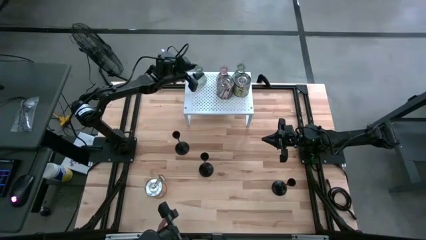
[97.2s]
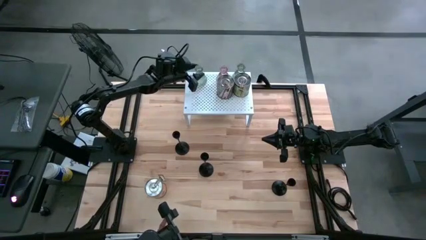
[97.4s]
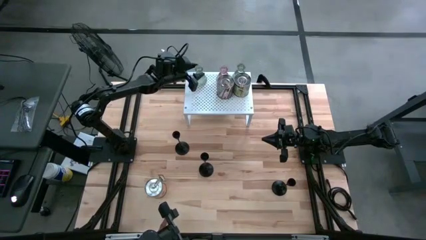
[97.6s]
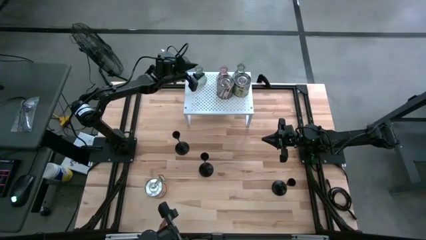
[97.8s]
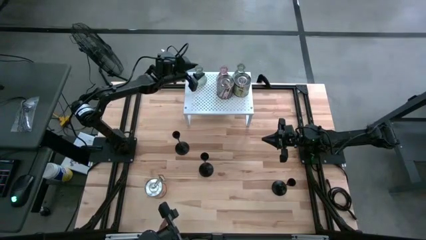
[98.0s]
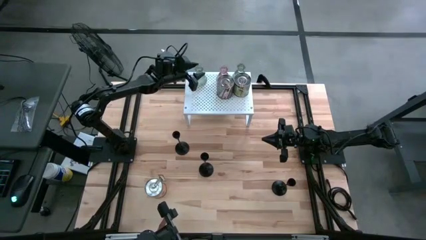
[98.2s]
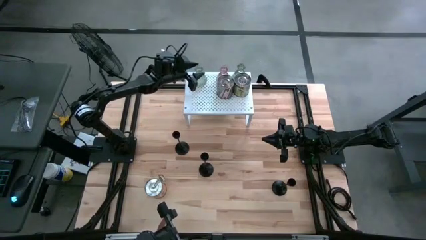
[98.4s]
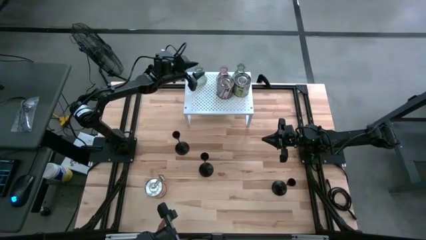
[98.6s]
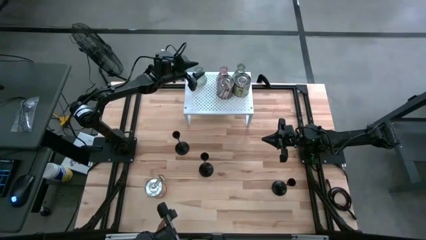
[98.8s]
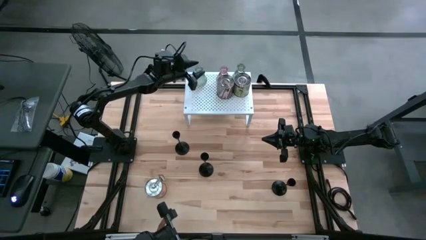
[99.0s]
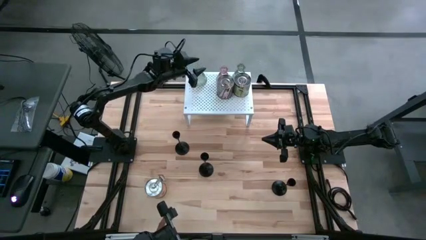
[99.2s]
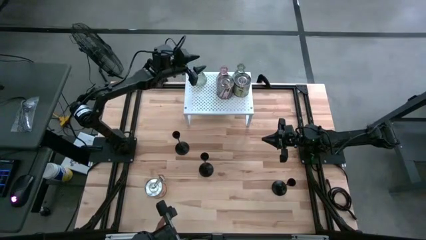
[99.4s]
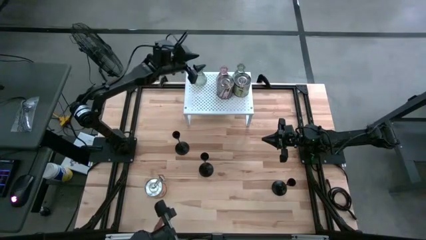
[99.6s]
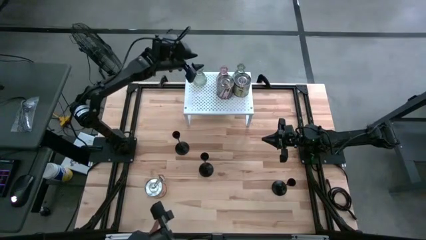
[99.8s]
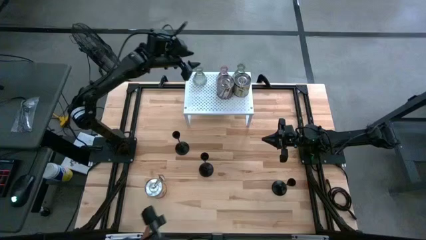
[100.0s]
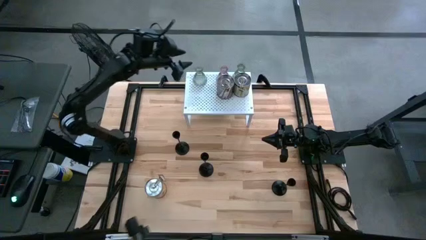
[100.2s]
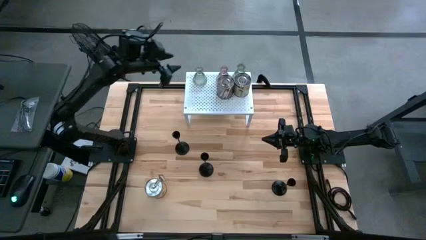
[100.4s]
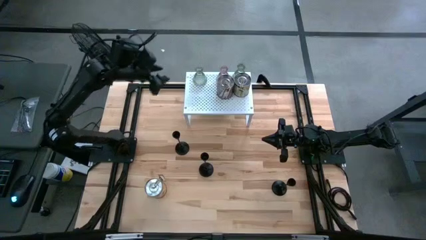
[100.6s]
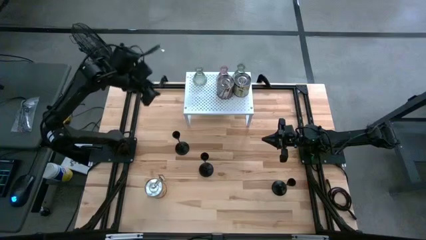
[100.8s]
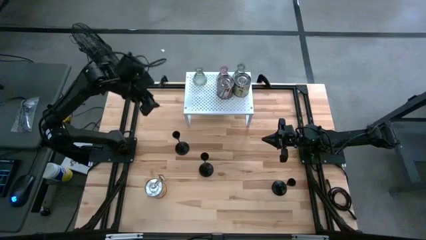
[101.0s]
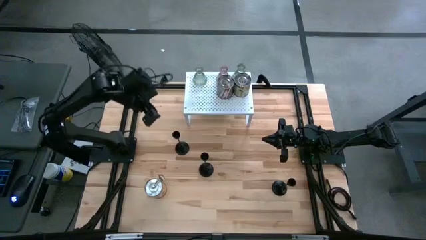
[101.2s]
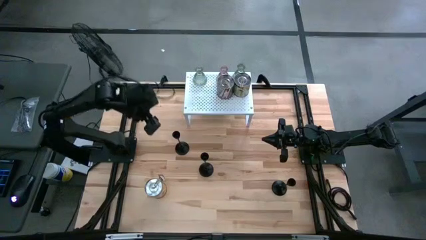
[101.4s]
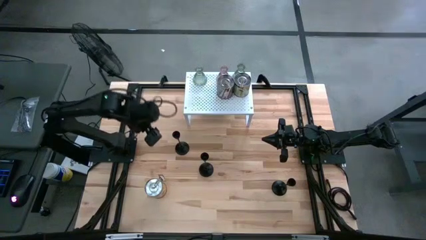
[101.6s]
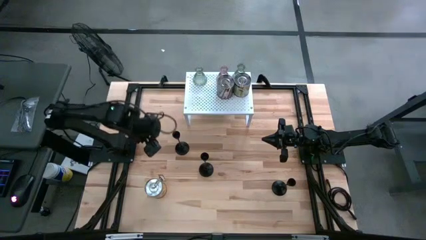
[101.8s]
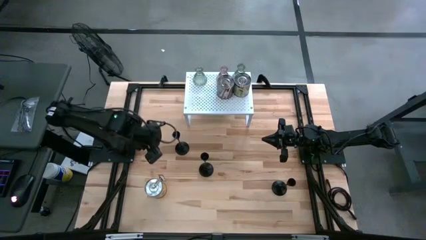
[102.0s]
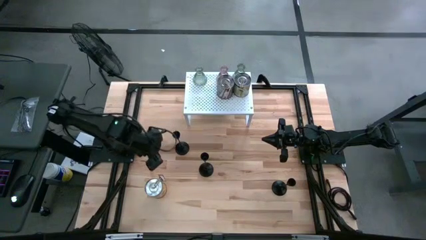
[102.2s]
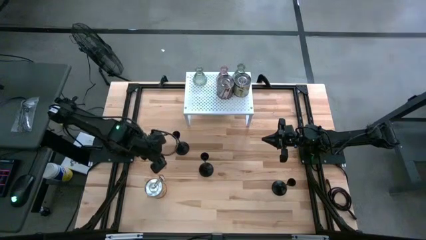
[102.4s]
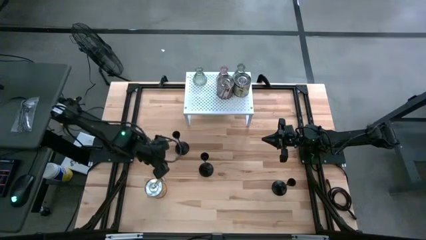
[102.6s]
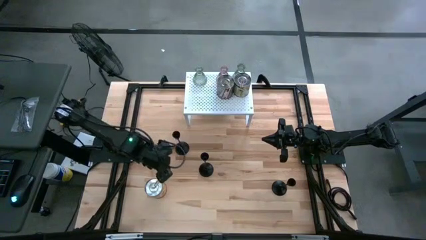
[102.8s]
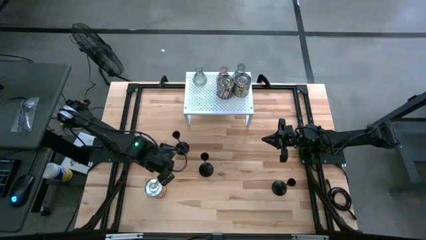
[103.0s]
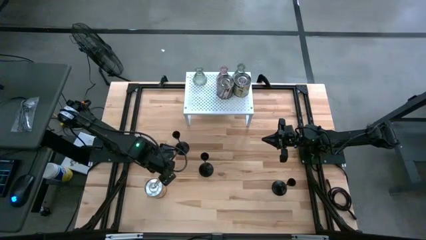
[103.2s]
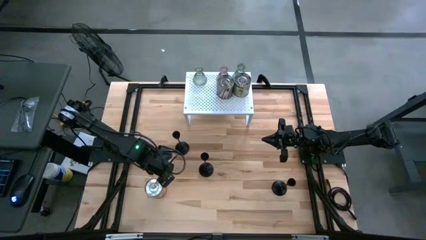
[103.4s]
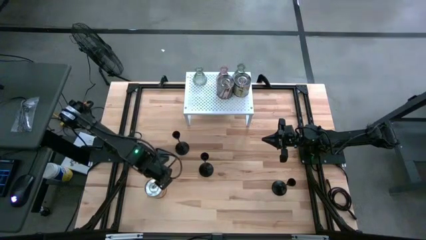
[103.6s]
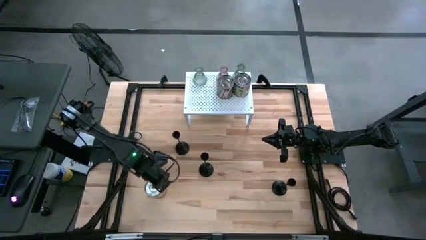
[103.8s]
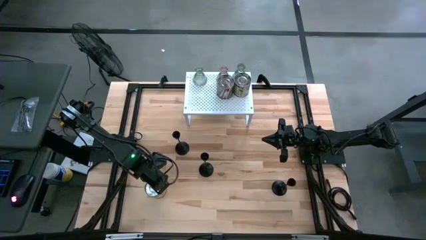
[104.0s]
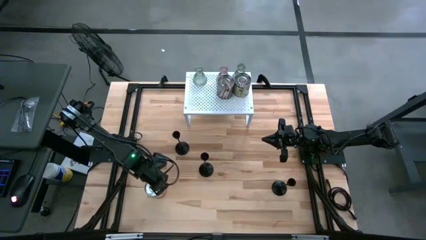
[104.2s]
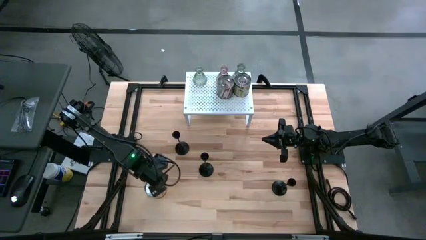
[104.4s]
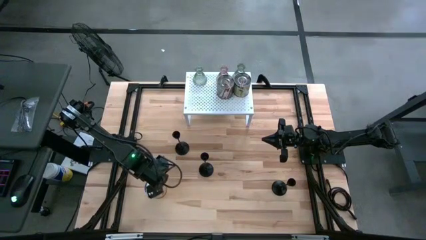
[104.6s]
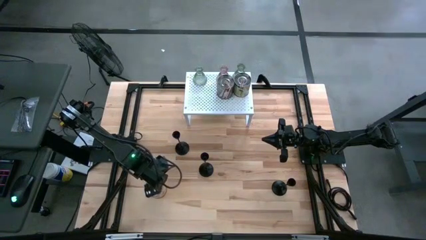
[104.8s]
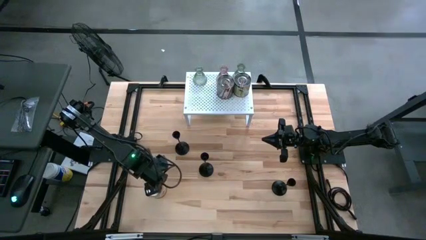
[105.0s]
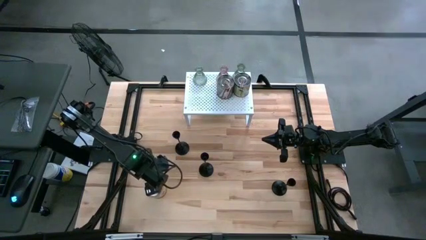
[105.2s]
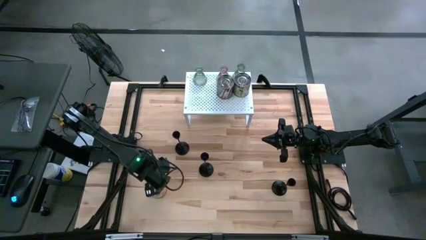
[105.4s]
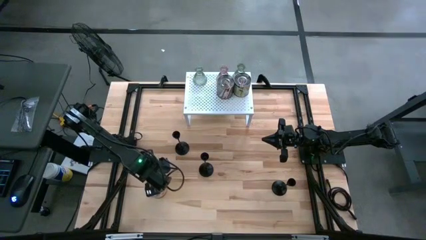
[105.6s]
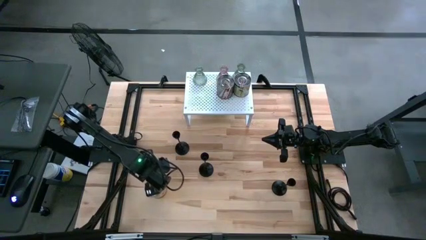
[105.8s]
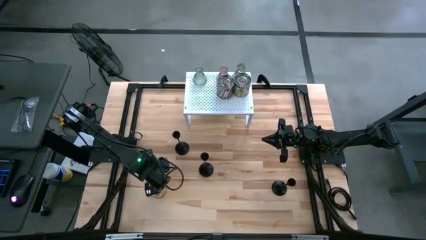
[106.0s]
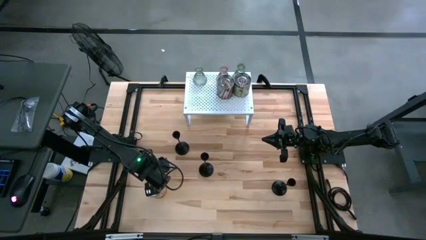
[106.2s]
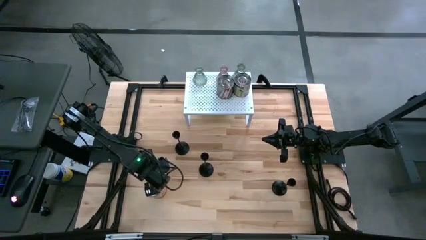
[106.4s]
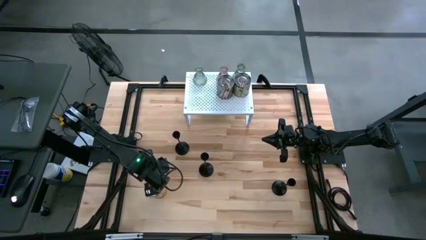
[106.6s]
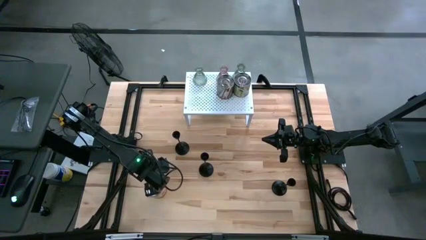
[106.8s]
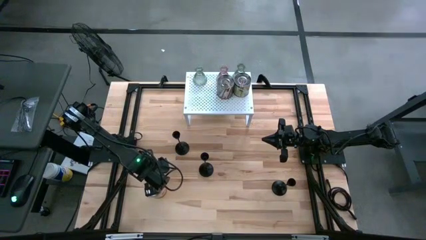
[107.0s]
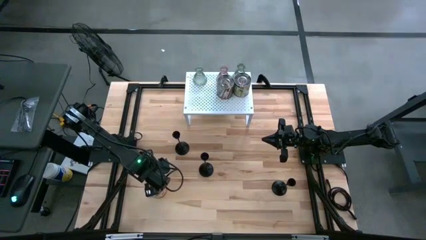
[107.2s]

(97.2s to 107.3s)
Task: Pick & Place candle stick holders
Put the orange scented candle on the shelf aligned with the other scented candles

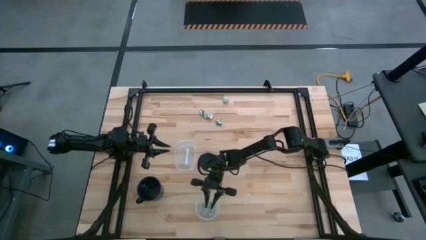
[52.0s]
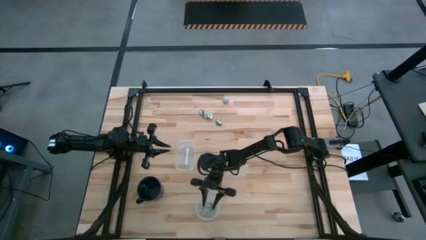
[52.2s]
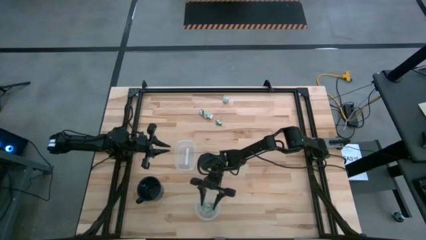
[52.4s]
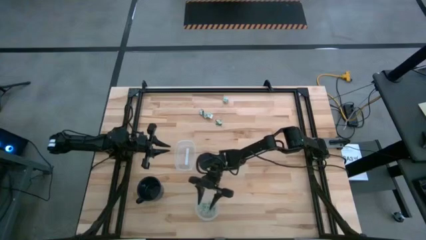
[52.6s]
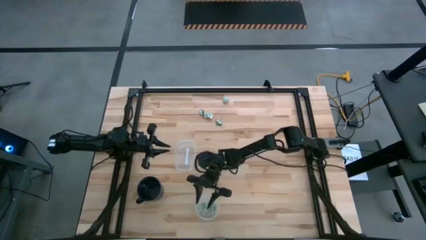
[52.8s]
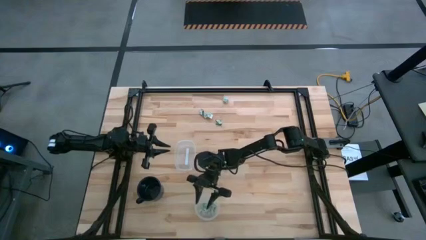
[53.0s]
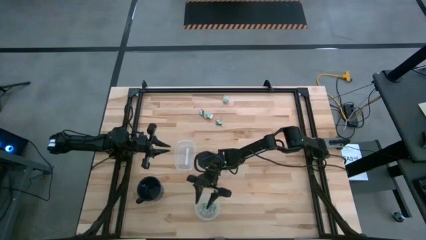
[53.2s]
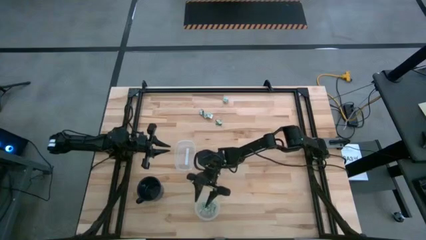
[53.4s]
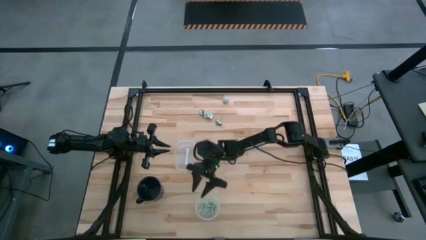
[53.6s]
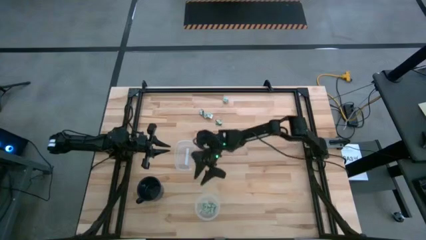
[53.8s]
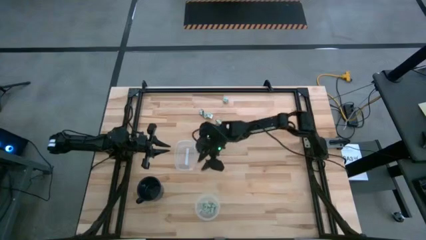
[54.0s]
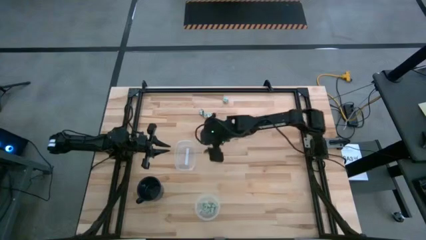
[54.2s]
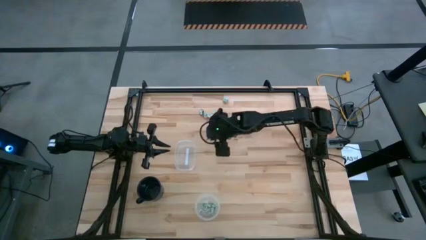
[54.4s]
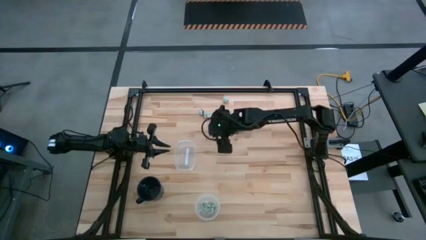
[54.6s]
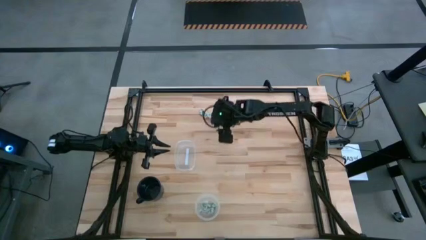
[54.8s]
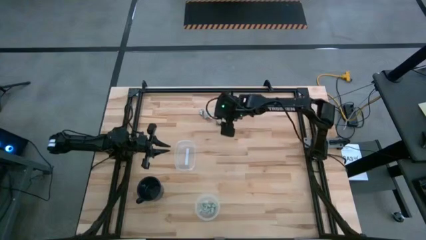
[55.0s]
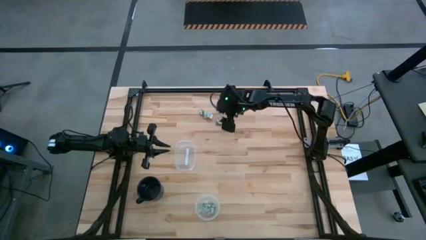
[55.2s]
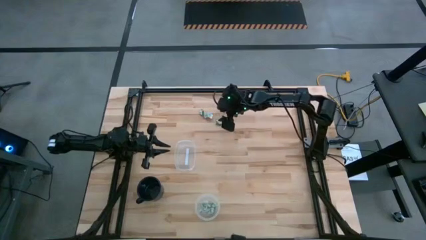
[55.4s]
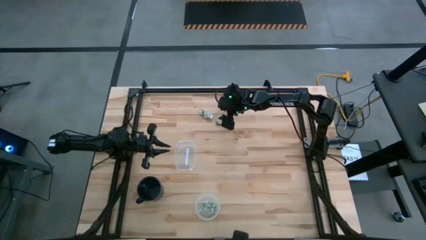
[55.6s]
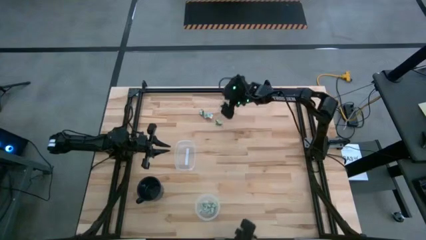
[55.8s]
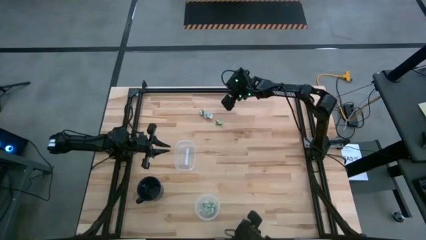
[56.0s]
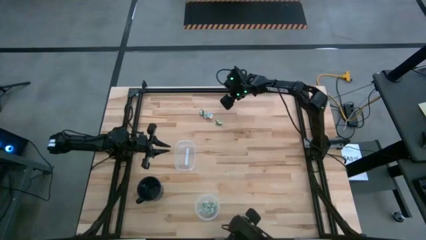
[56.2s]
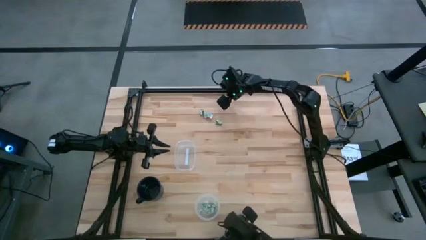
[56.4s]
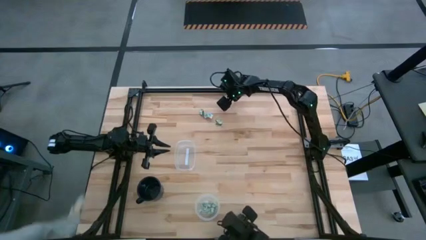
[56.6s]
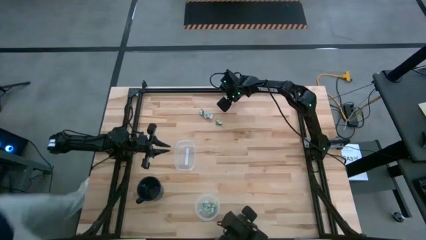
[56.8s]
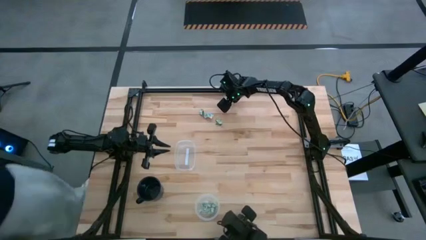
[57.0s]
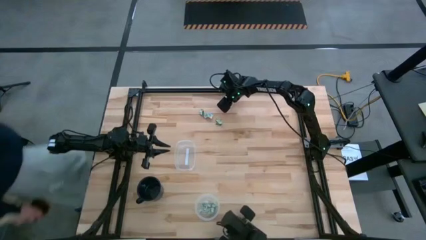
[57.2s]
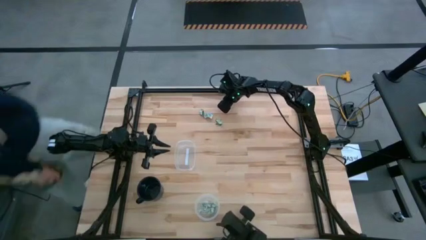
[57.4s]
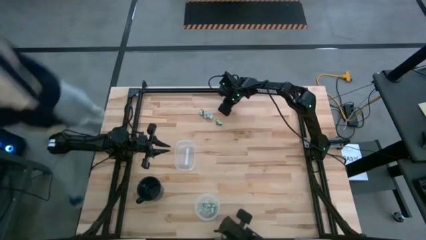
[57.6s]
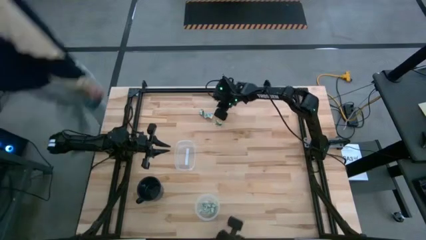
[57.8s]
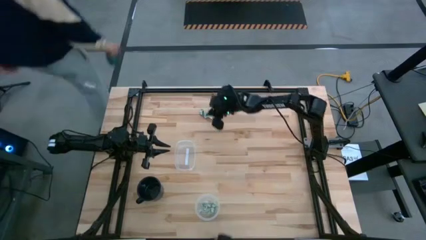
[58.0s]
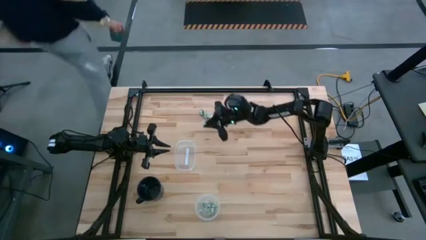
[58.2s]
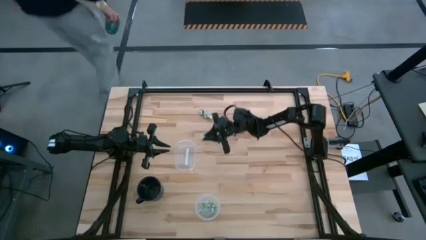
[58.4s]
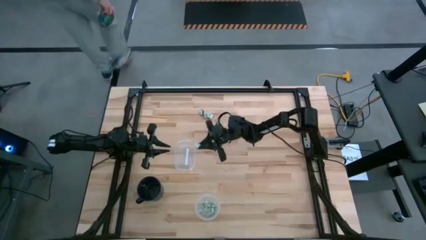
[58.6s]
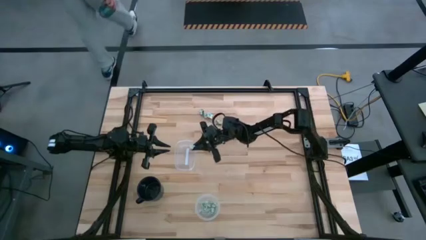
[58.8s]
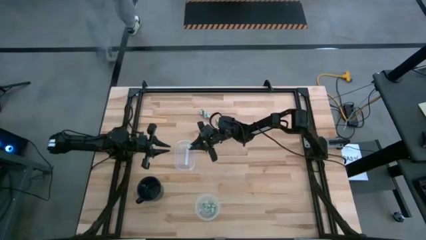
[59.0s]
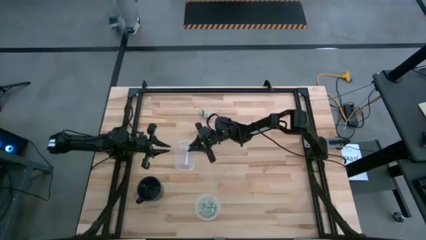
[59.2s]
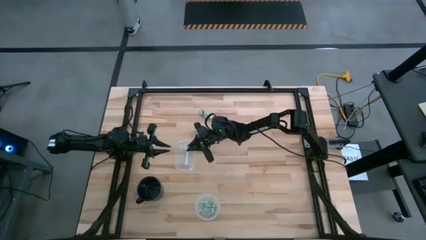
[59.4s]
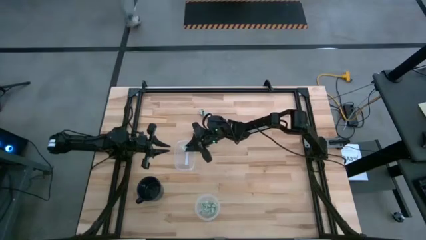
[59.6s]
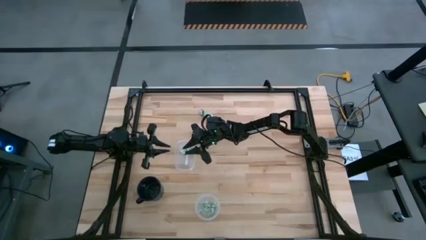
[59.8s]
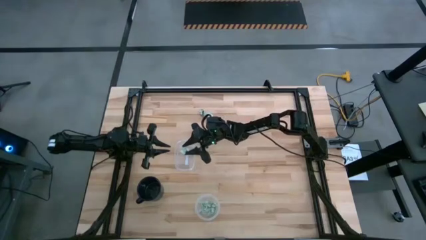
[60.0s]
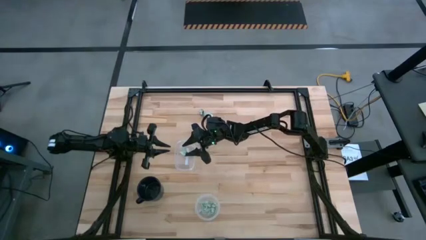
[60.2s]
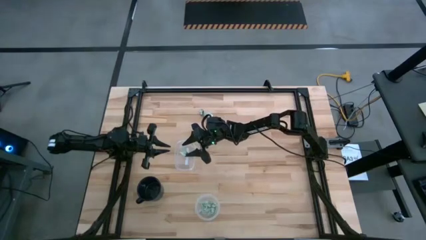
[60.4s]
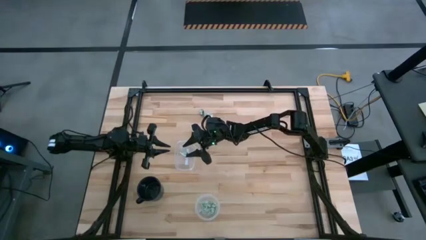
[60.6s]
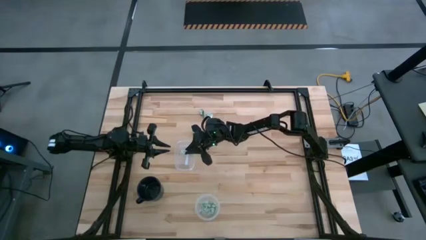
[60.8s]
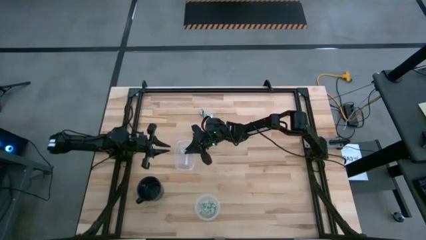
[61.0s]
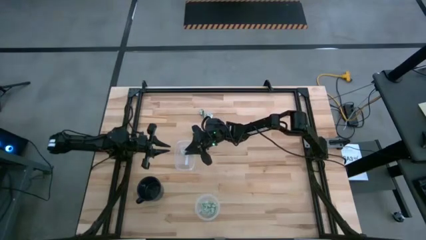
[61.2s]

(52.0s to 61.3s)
Task: Pick and place Stevia / Truvia into bins
Put the stevia packet into the oval transparent container
